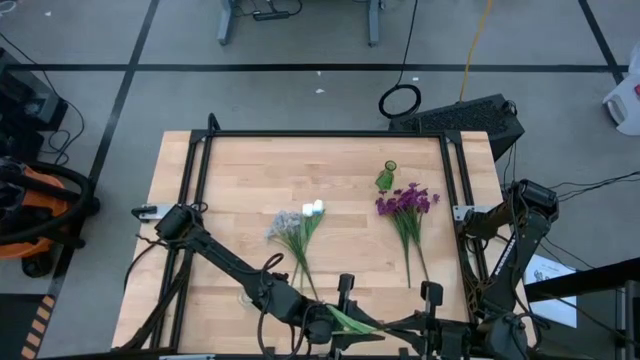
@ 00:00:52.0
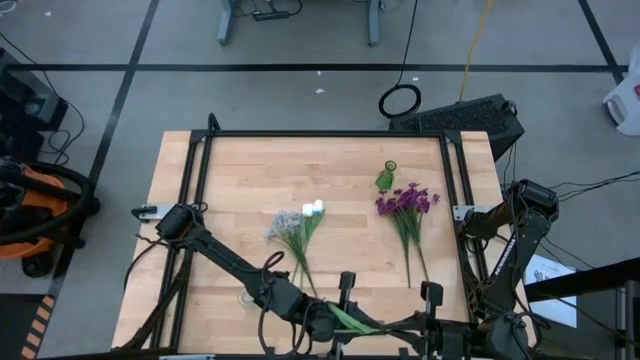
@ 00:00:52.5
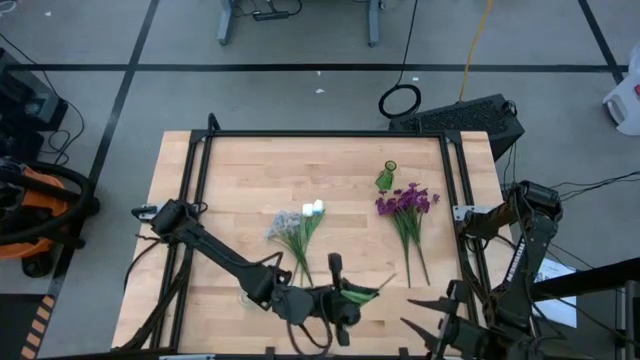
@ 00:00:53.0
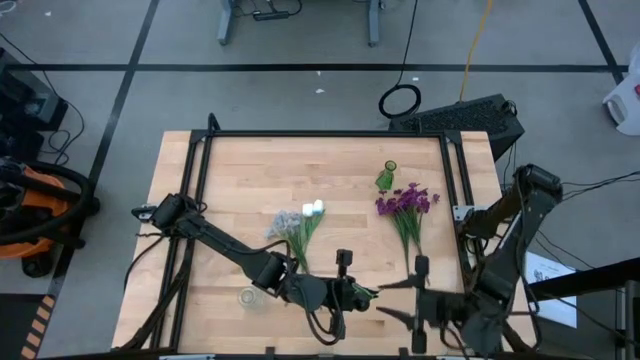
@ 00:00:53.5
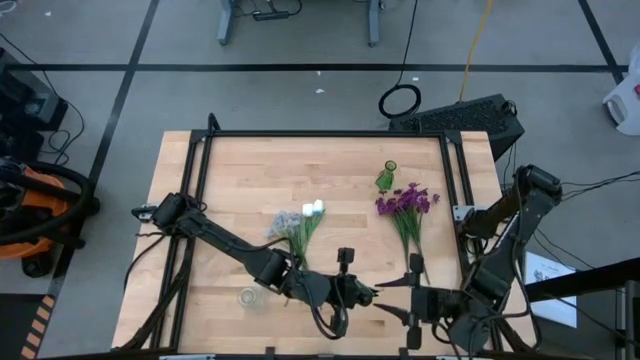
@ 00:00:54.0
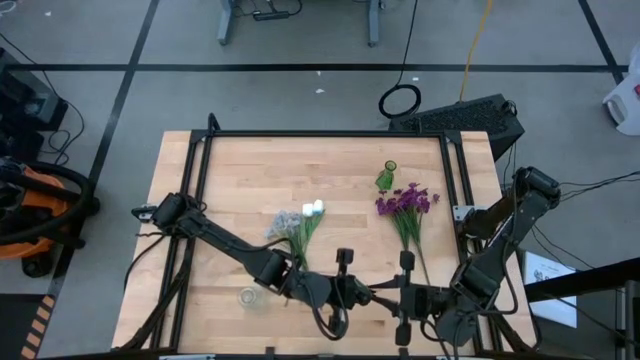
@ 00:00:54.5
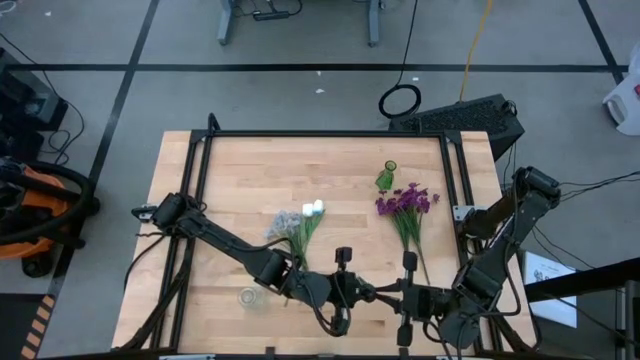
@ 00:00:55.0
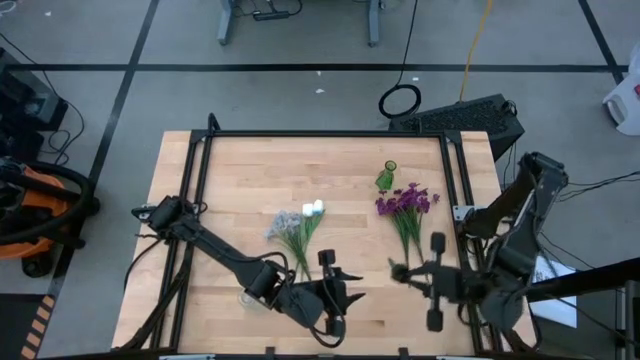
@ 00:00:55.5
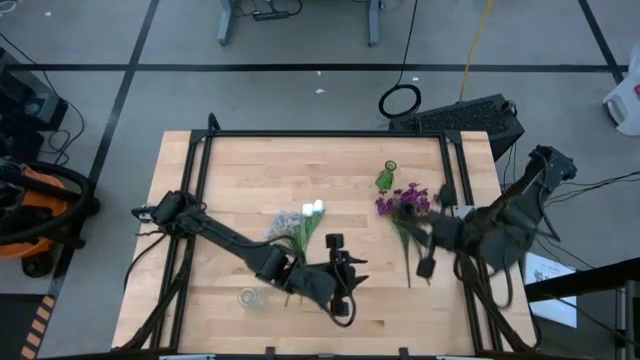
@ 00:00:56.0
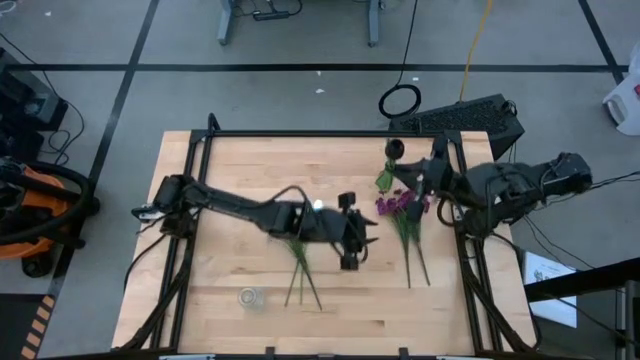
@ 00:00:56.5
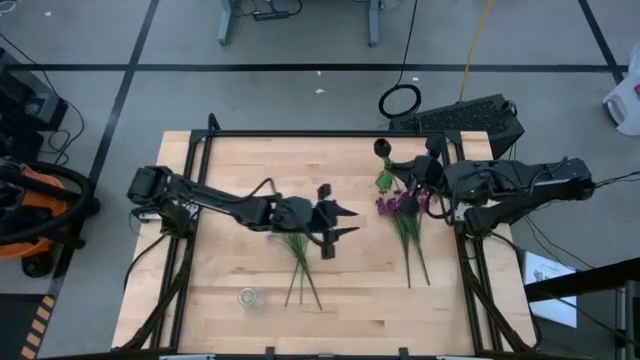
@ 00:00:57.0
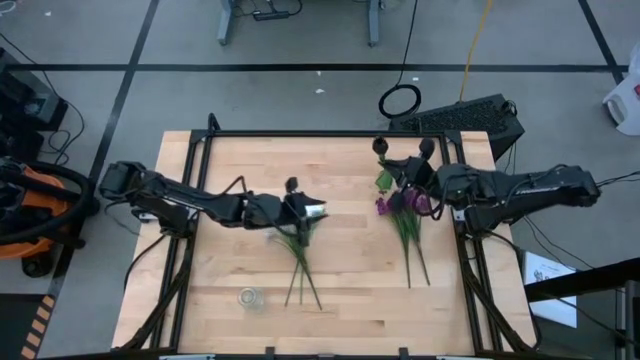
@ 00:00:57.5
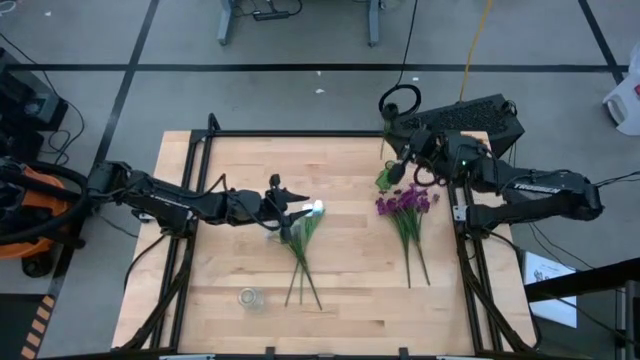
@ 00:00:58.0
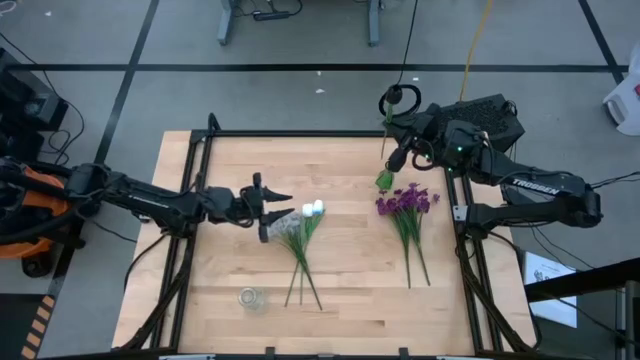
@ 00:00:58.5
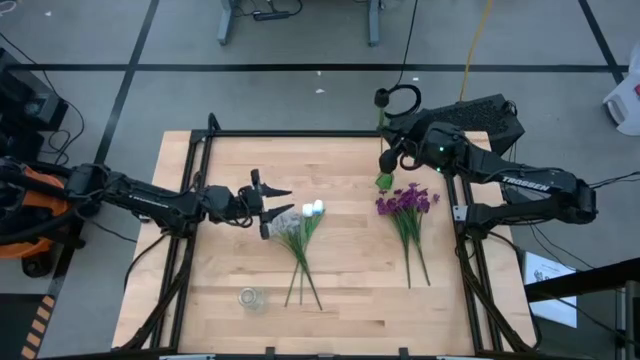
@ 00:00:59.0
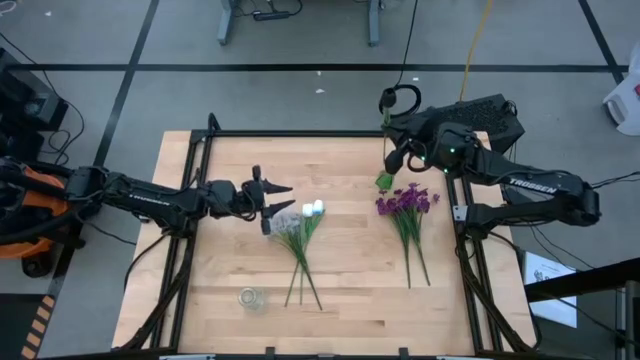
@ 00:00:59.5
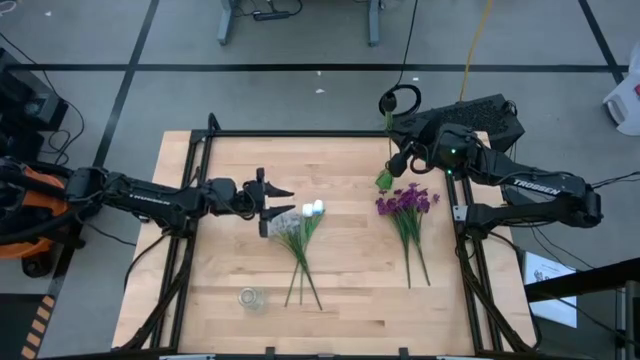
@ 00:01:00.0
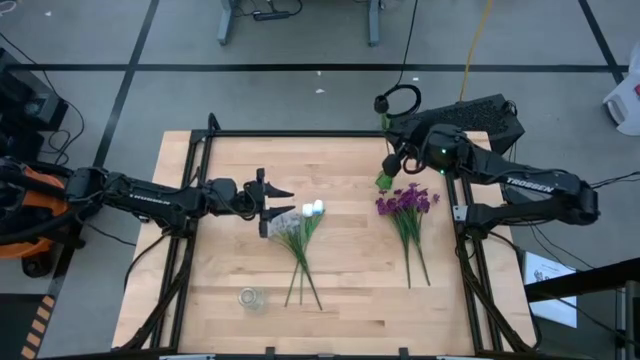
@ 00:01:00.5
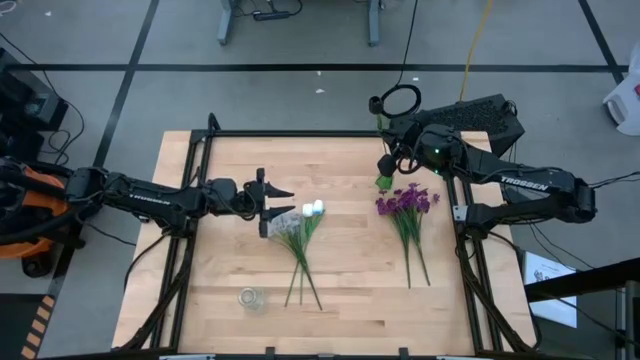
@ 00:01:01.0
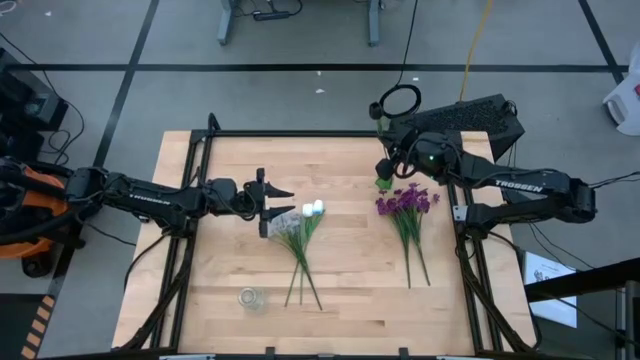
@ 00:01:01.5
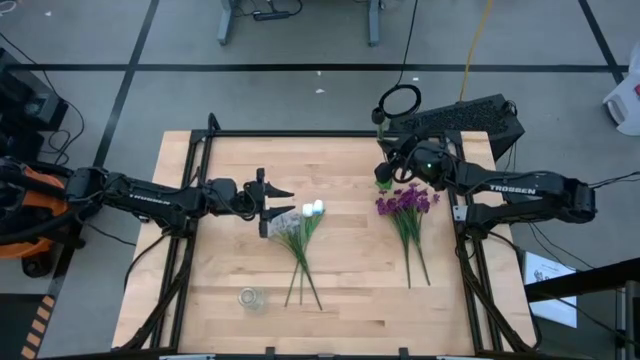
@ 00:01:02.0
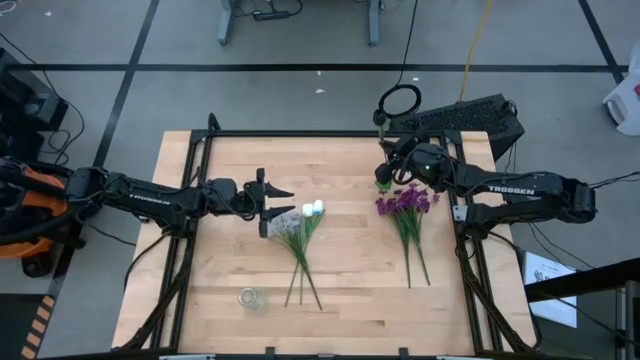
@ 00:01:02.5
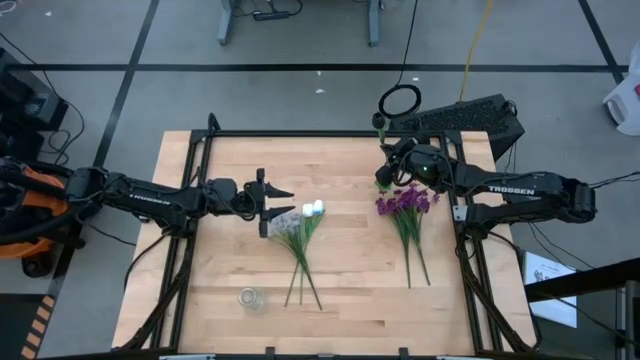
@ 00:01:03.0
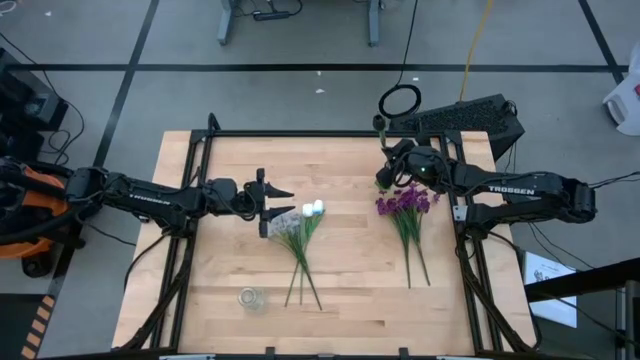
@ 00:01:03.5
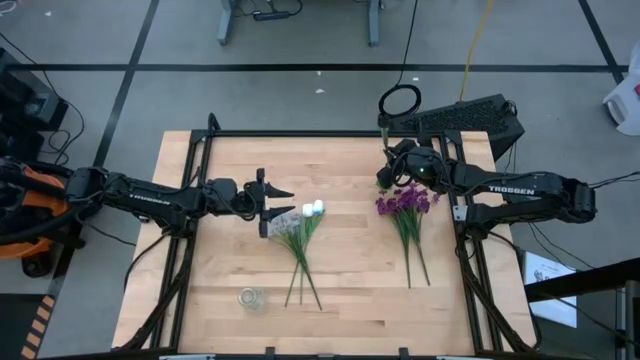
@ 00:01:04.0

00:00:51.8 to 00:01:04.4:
Task: Sort flowers into vase by color
Put the black flower into the green vase

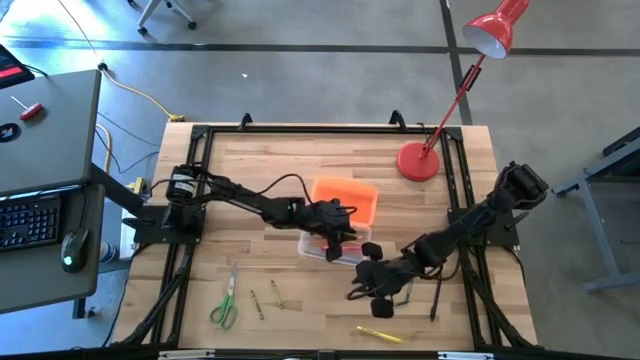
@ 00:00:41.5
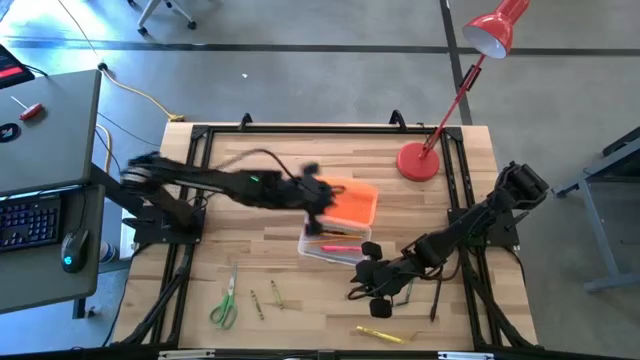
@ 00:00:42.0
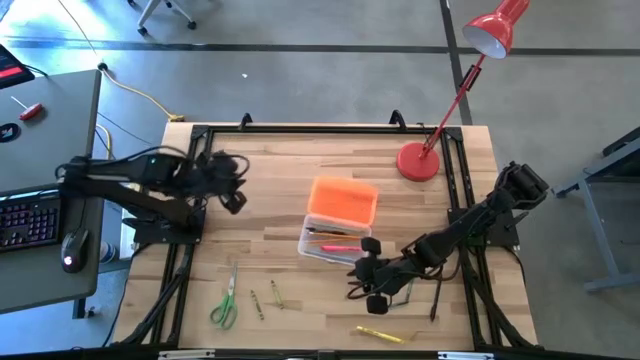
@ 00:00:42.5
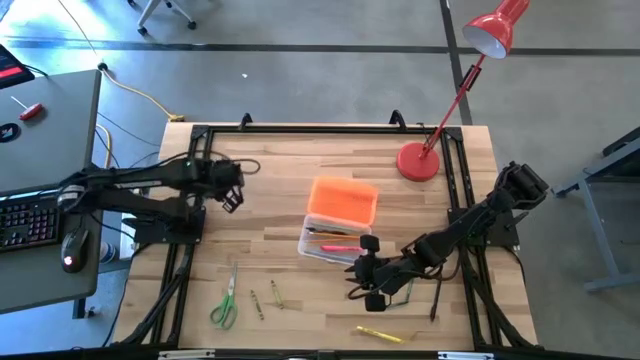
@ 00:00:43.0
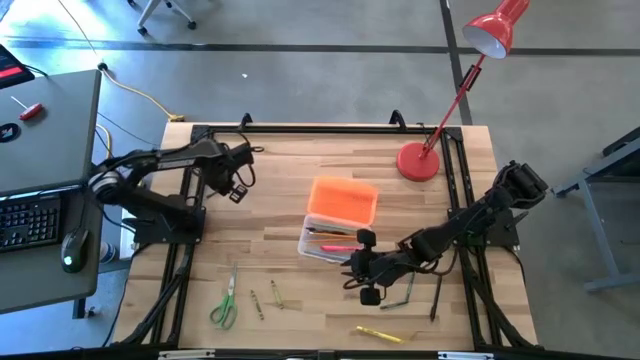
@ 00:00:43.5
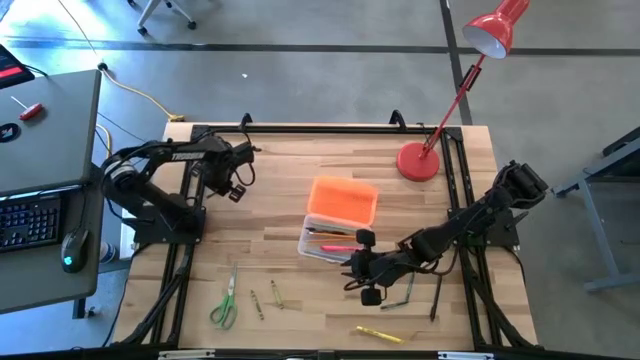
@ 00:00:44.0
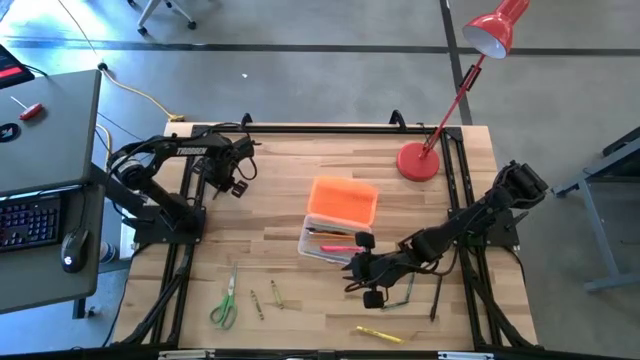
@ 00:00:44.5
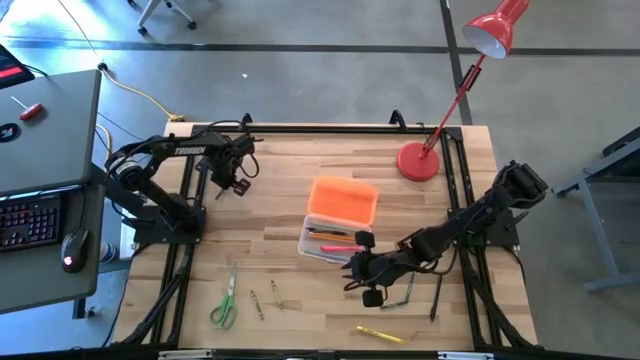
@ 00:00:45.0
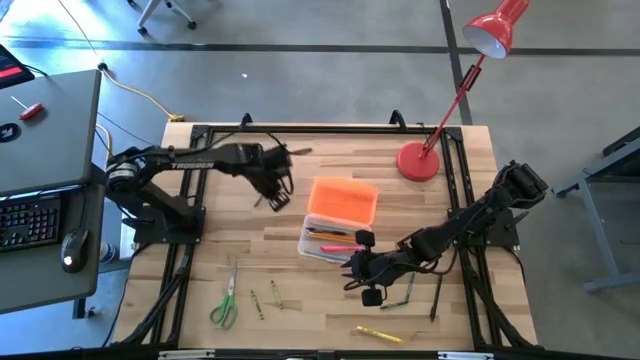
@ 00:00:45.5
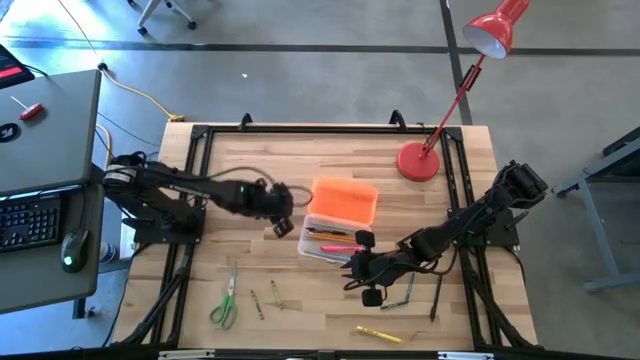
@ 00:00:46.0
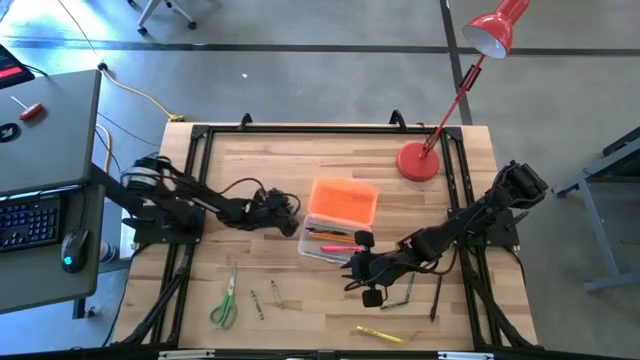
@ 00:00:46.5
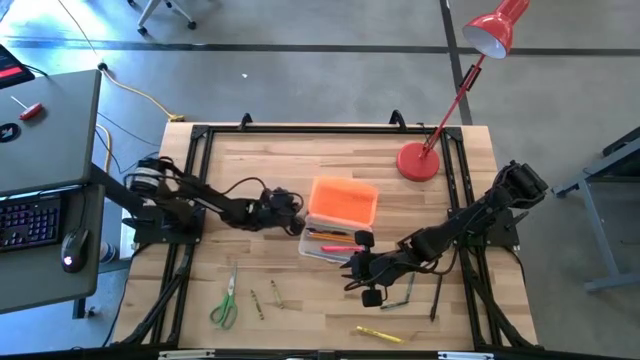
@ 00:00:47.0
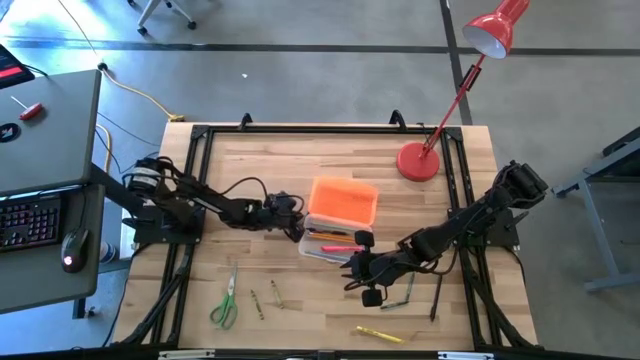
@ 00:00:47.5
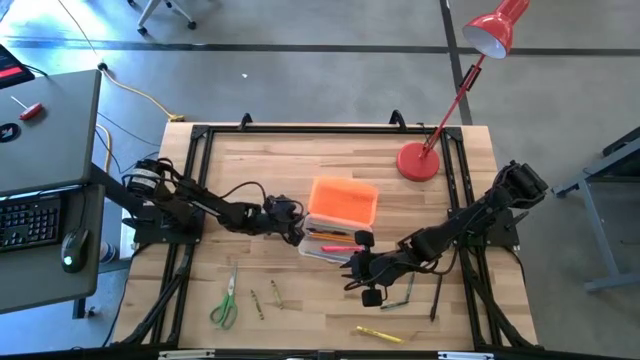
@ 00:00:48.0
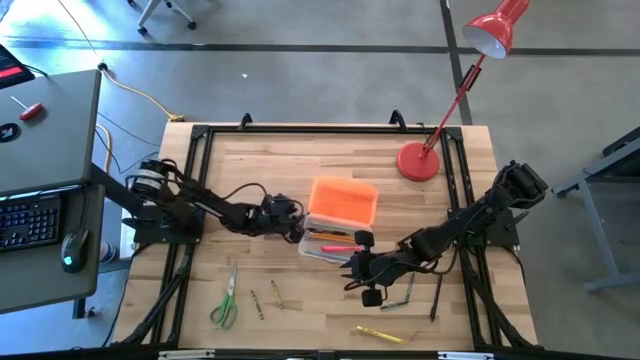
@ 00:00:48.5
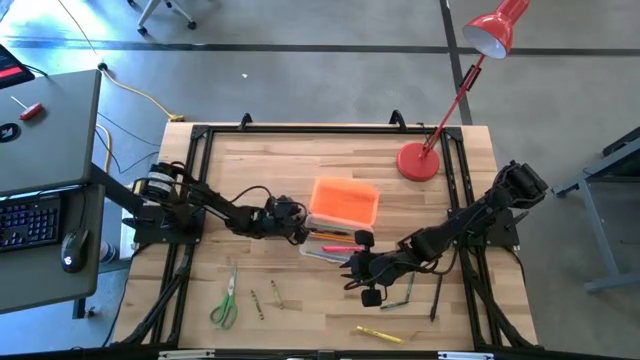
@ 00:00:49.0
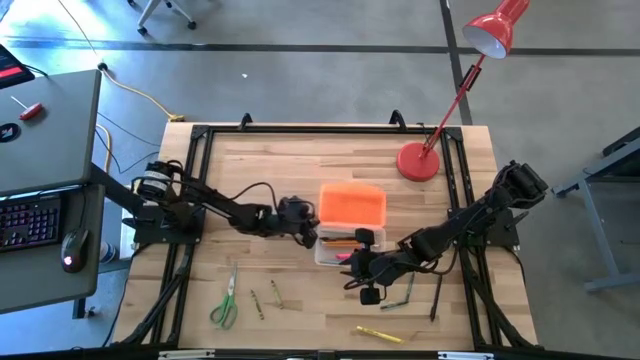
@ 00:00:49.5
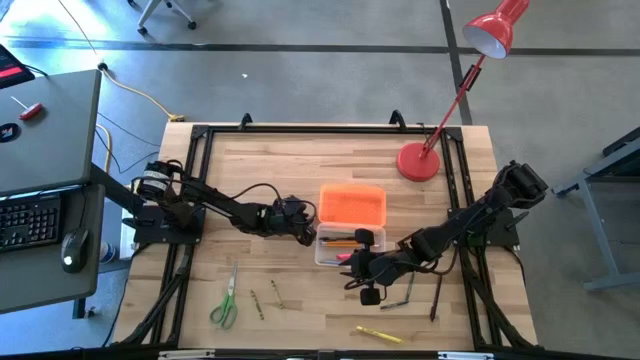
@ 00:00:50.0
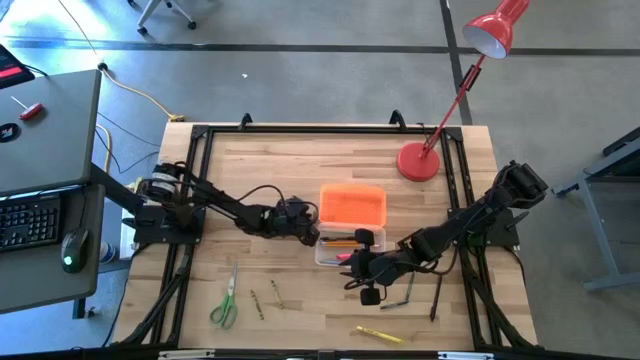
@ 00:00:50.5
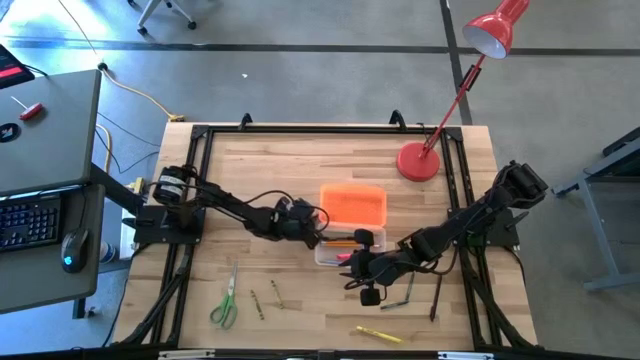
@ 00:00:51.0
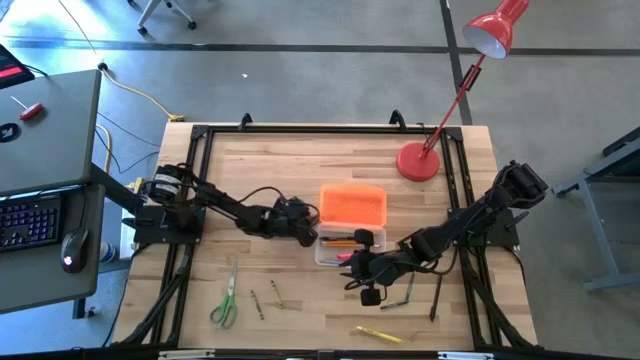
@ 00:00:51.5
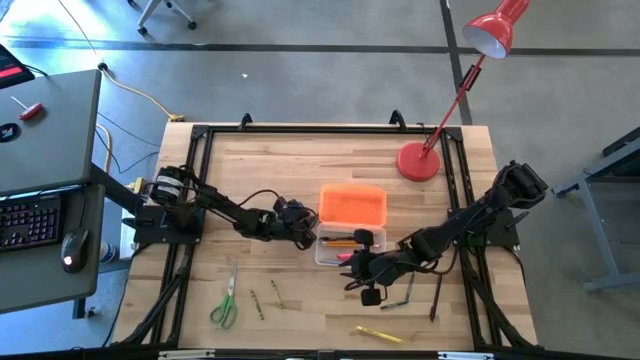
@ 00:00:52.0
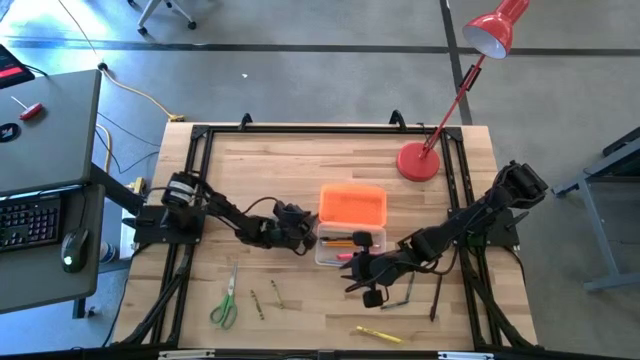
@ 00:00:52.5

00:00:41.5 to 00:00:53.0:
Task: Pick & place school supplies into a supply box
Put the top dark green crayon into the supply box
